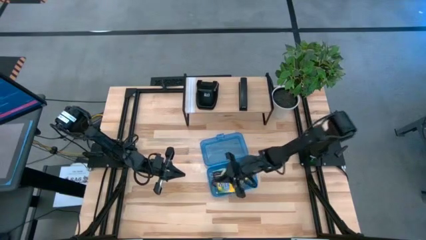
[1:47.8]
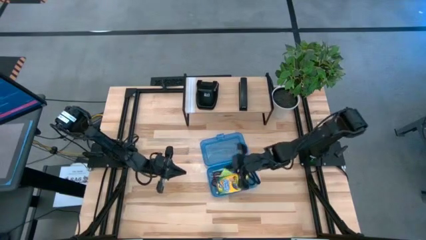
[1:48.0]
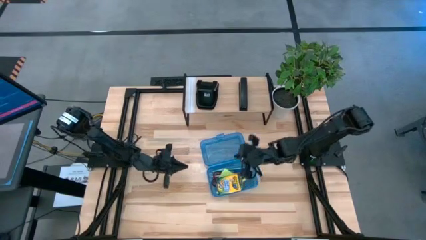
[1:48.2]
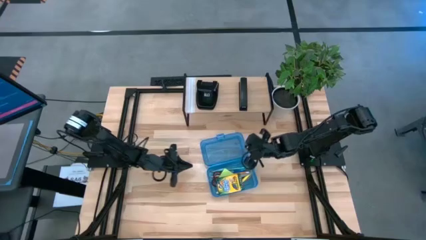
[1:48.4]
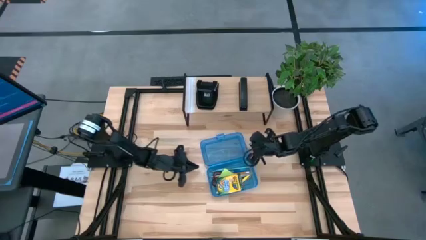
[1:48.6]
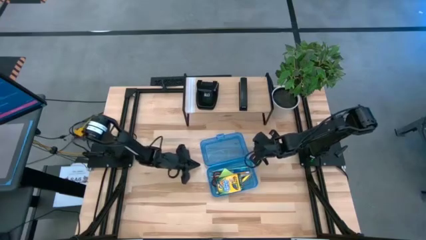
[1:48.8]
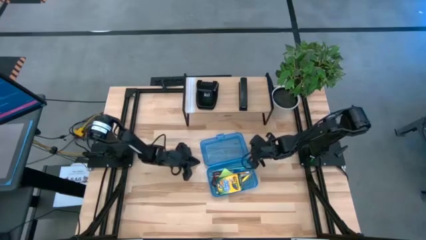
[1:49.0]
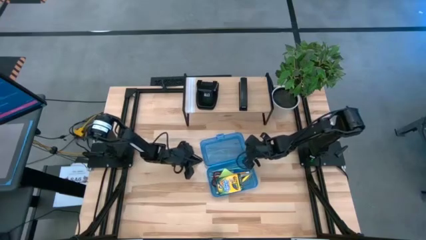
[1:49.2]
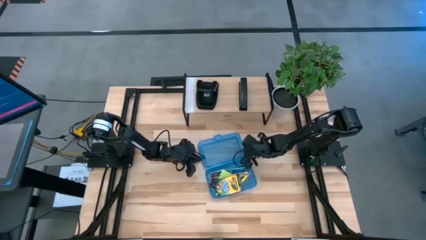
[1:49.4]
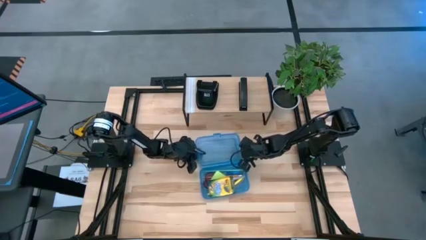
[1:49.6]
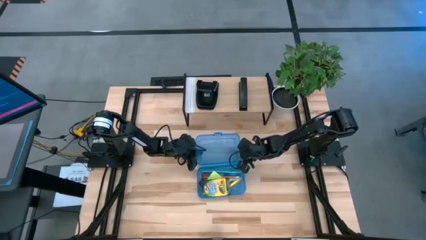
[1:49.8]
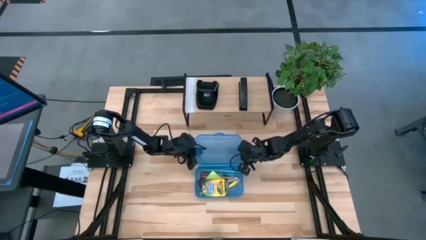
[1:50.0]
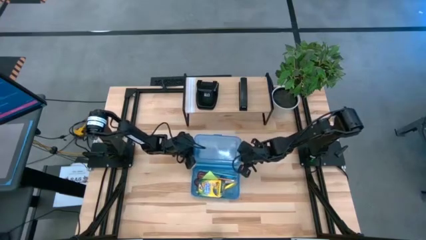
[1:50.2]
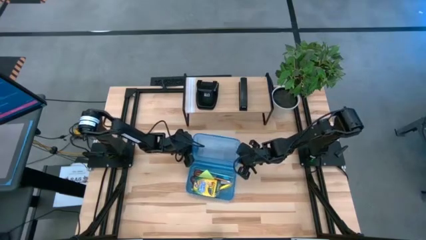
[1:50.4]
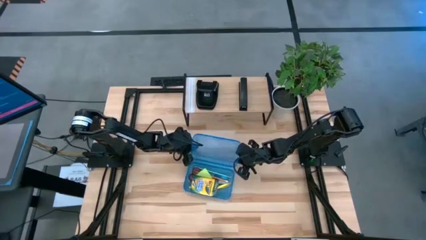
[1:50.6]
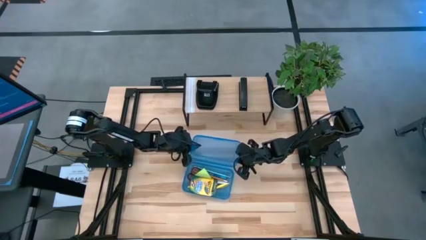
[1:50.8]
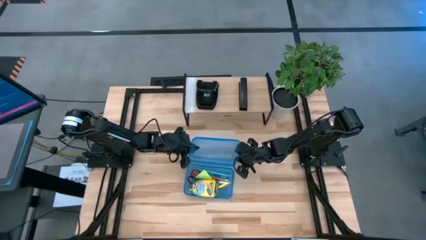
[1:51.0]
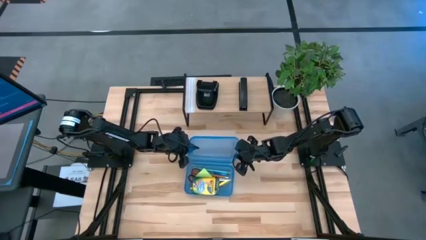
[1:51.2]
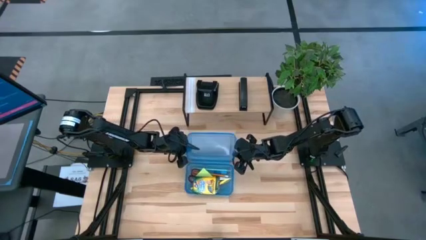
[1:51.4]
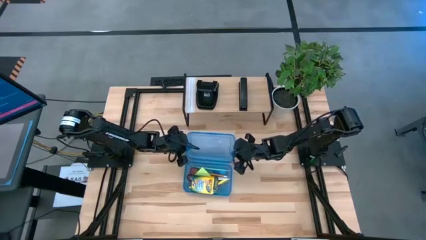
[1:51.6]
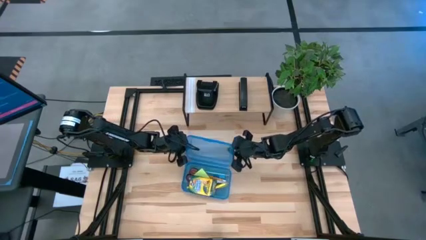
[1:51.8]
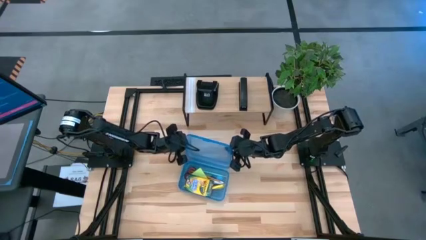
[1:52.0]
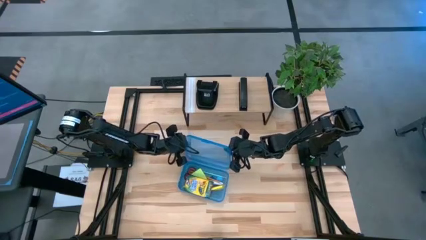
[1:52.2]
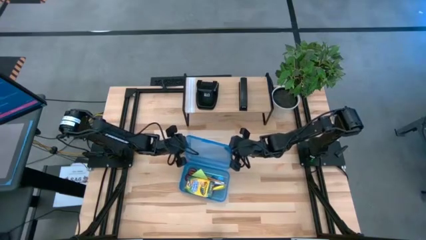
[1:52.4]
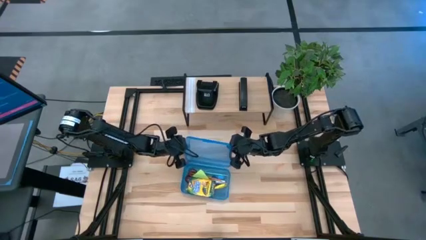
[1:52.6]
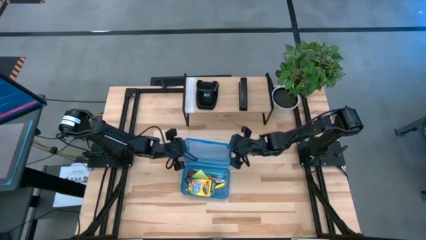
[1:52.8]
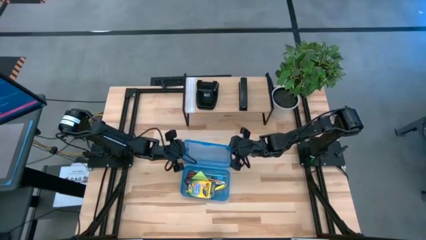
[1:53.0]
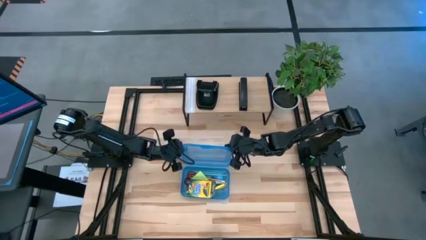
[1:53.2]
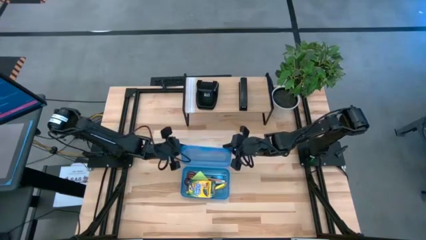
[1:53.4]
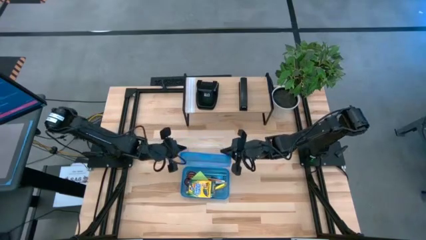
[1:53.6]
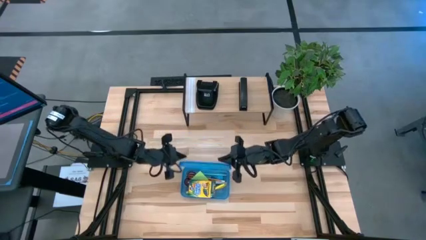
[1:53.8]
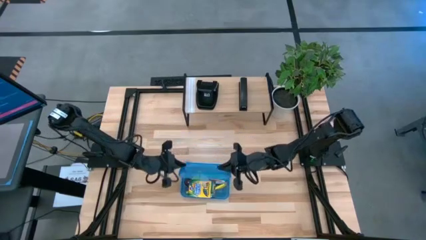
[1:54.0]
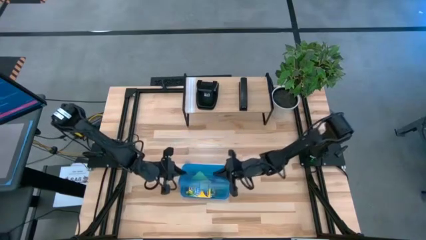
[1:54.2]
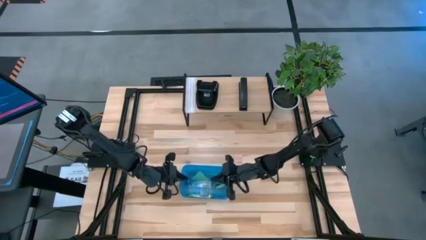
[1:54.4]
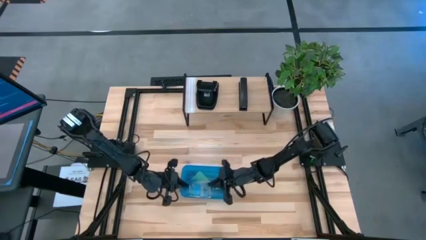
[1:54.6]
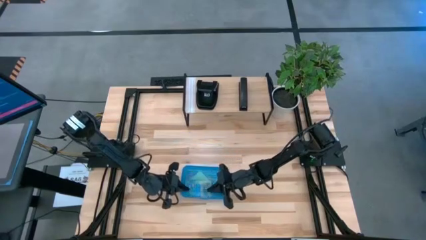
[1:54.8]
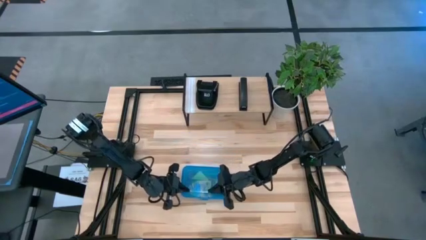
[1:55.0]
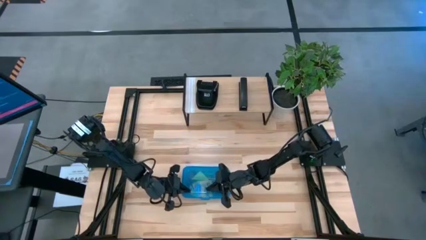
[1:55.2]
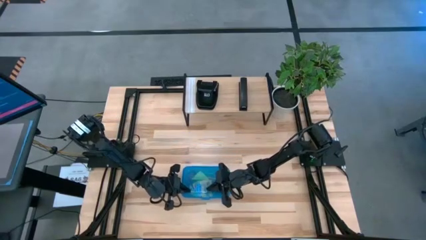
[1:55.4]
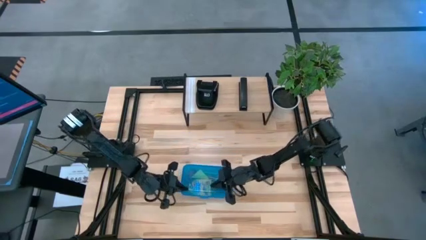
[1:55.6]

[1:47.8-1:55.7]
Task: Pack school essentials
Close the blue supply box

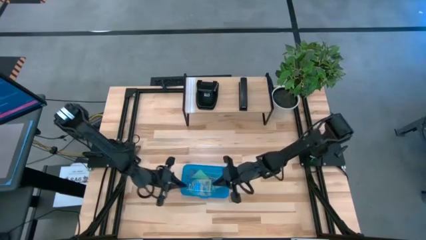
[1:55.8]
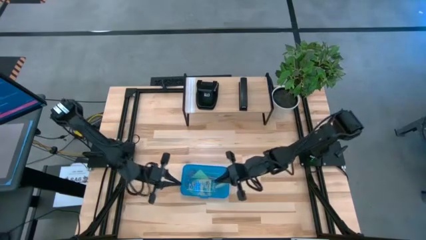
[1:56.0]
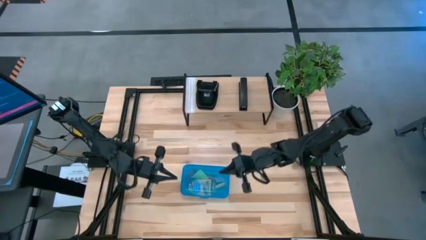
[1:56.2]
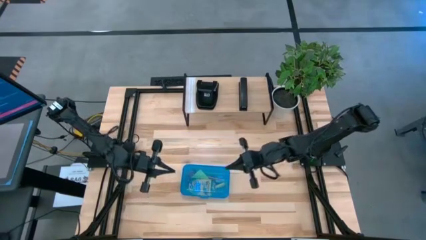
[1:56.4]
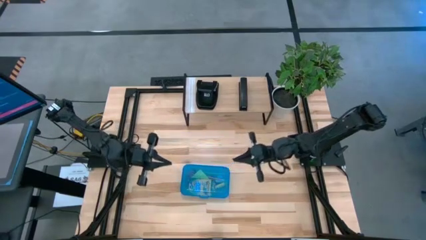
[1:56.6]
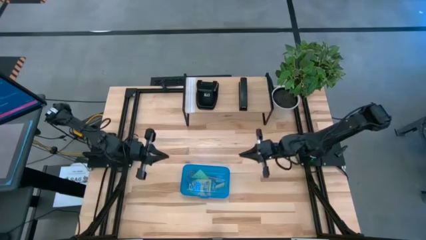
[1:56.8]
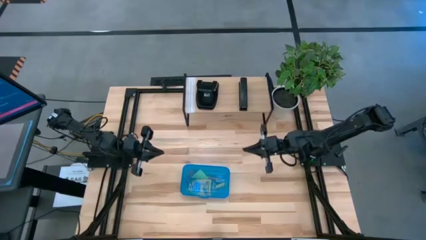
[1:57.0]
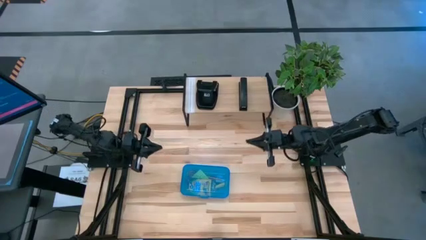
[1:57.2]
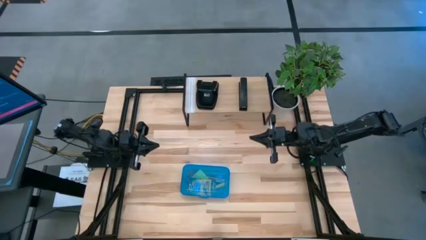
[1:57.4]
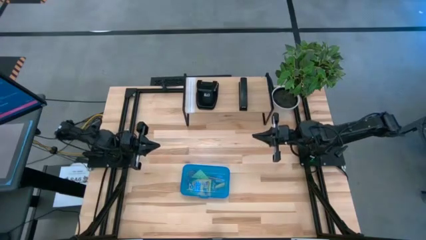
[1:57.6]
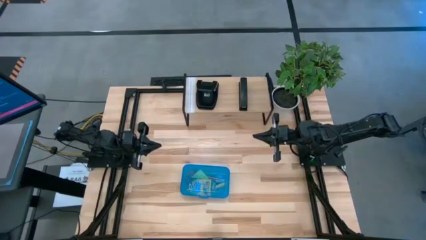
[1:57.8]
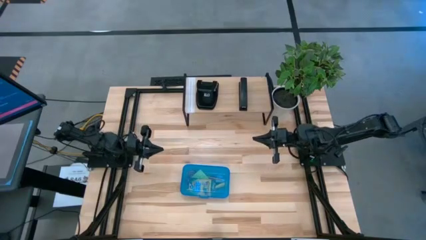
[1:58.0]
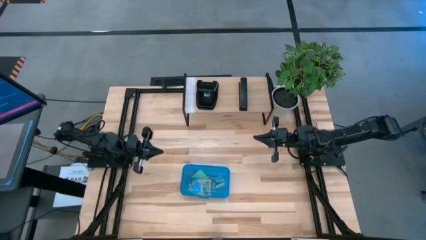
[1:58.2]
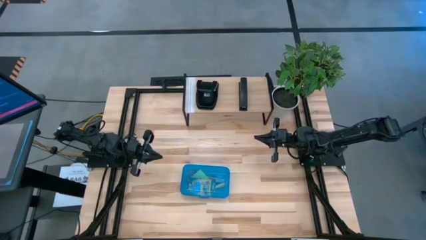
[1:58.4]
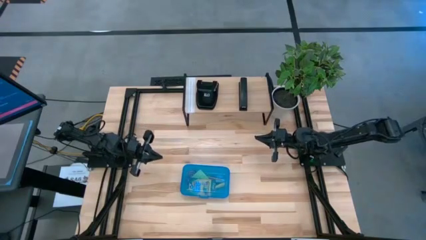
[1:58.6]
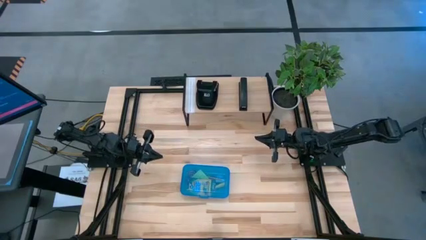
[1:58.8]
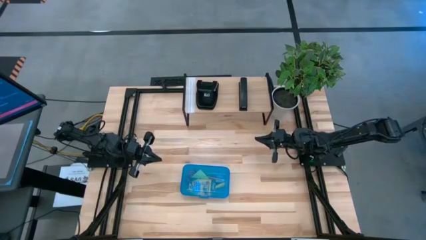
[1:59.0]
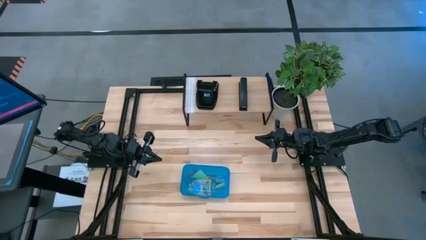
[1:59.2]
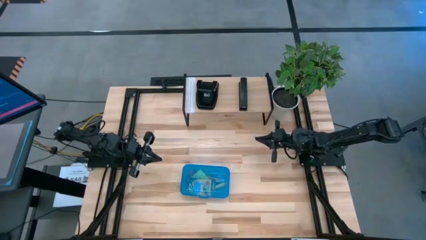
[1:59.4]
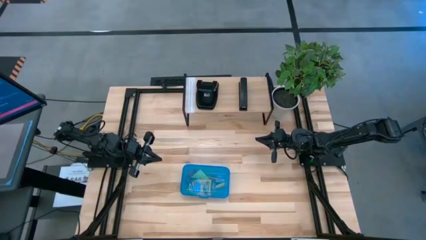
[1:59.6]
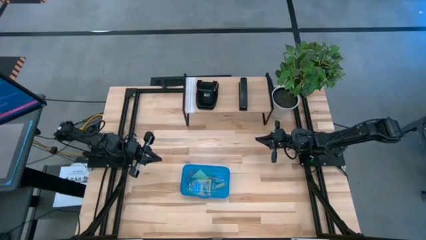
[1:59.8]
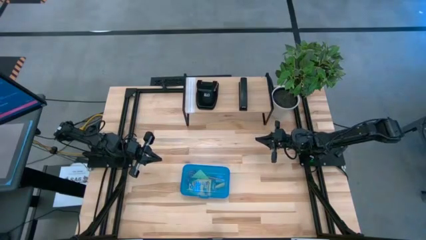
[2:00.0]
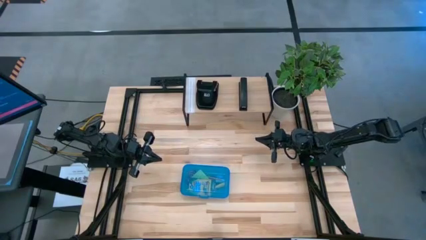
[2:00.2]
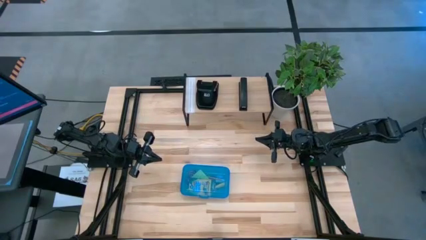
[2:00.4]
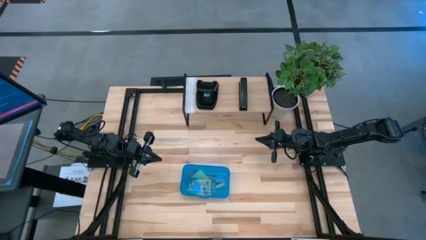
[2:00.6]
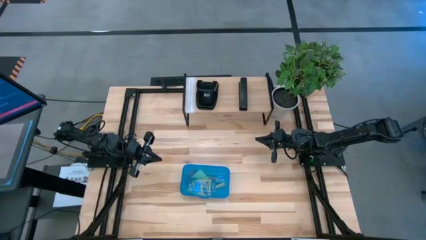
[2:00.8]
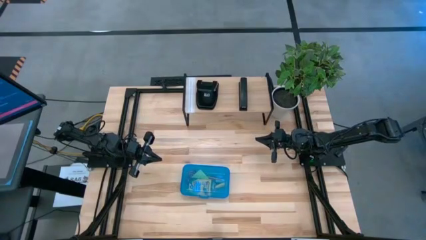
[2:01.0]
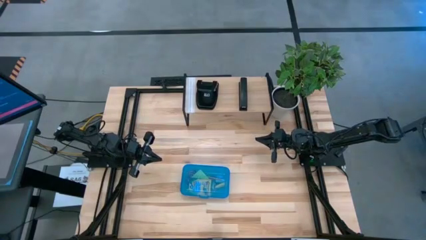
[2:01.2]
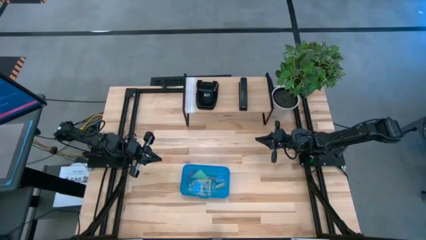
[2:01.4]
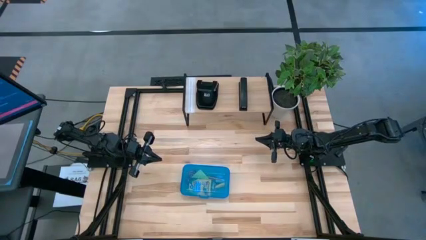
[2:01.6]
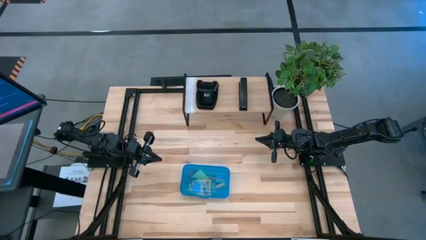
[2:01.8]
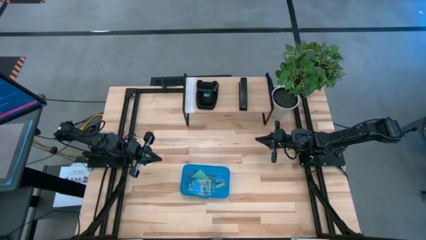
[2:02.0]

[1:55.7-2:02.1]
Return to Home Position
